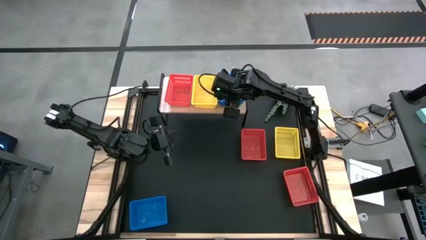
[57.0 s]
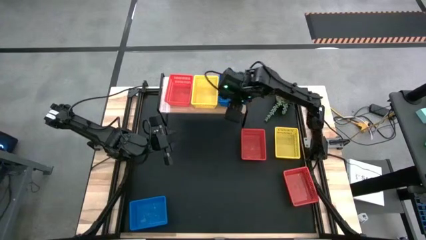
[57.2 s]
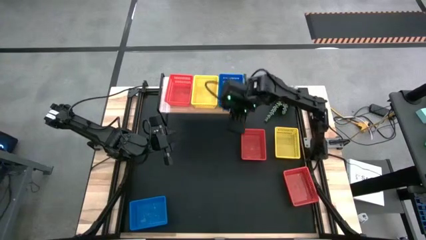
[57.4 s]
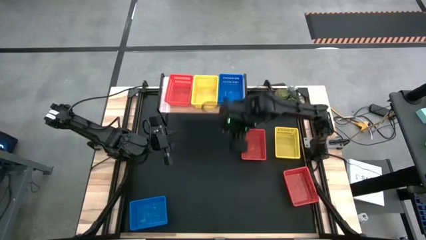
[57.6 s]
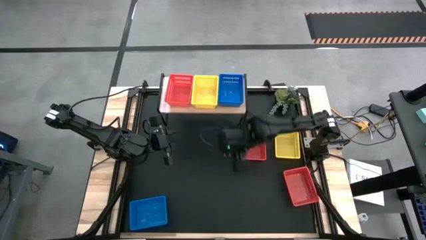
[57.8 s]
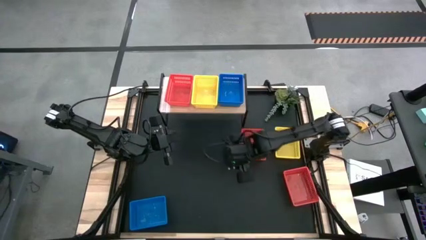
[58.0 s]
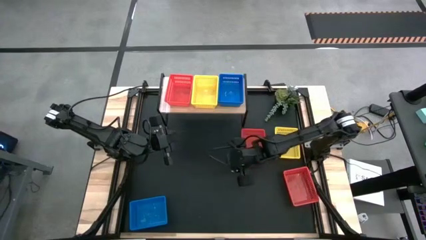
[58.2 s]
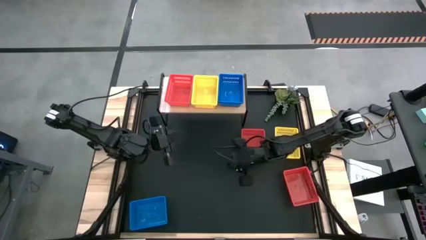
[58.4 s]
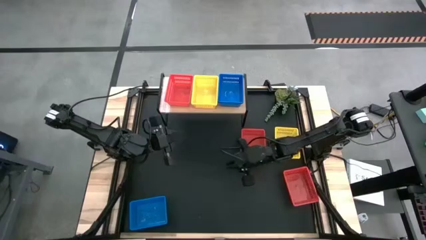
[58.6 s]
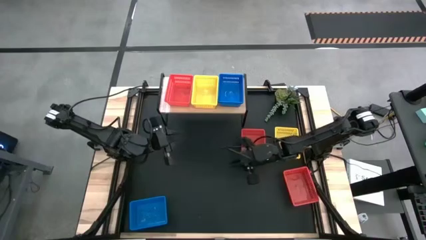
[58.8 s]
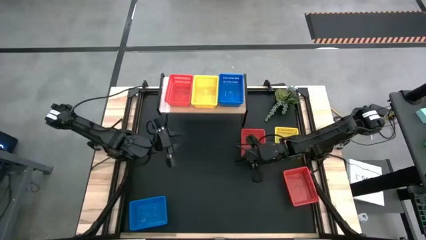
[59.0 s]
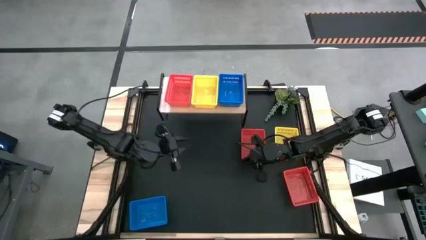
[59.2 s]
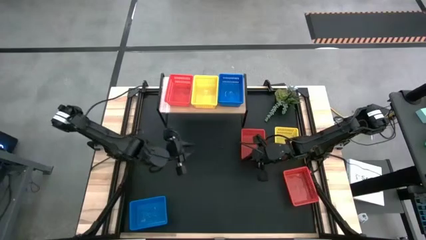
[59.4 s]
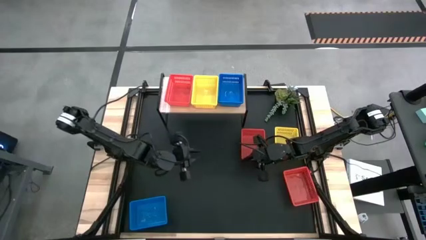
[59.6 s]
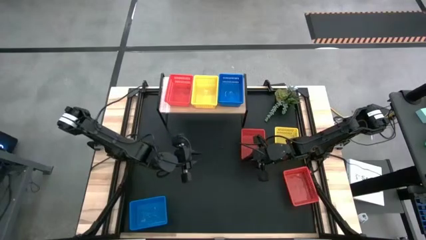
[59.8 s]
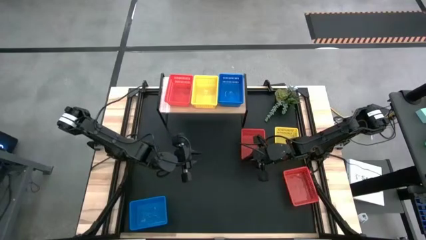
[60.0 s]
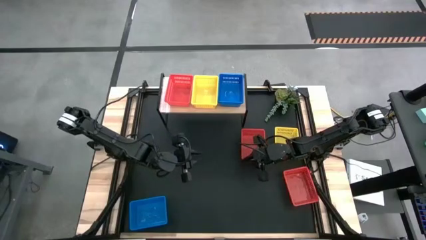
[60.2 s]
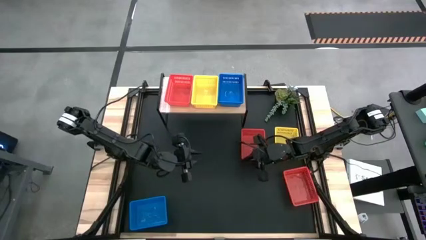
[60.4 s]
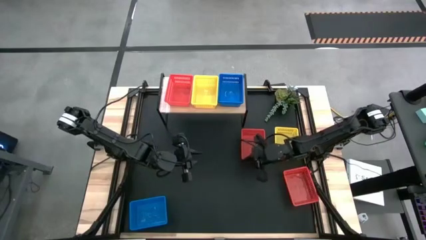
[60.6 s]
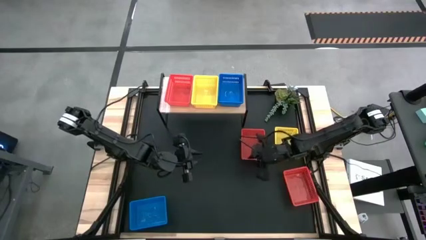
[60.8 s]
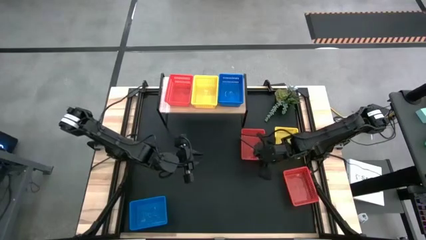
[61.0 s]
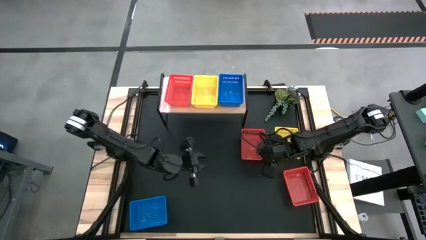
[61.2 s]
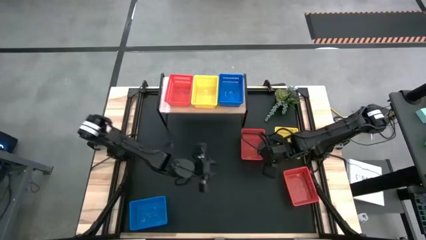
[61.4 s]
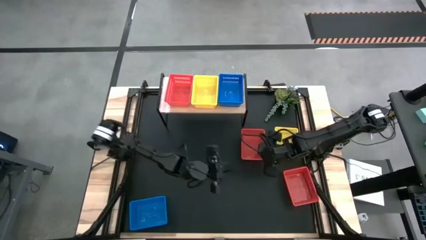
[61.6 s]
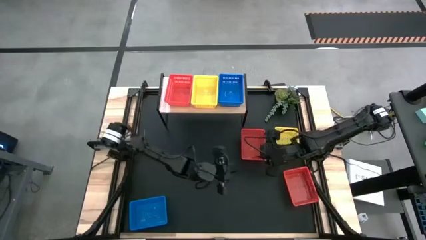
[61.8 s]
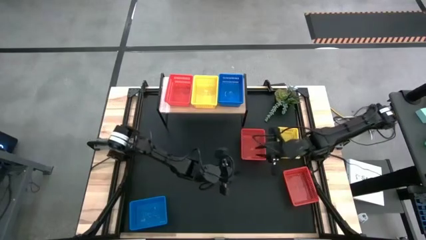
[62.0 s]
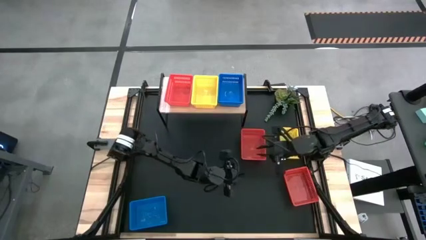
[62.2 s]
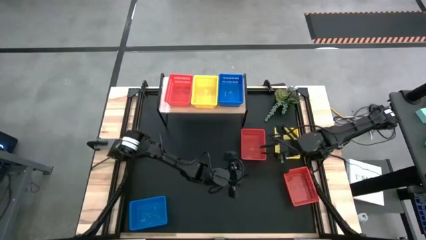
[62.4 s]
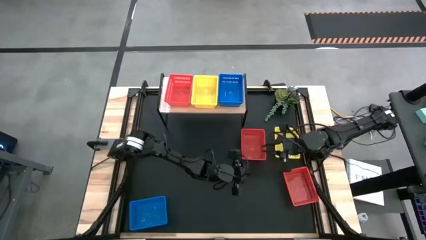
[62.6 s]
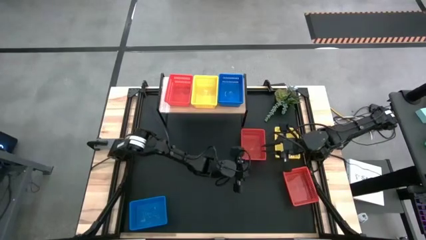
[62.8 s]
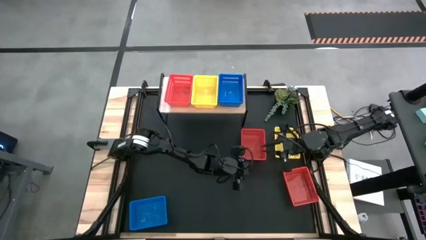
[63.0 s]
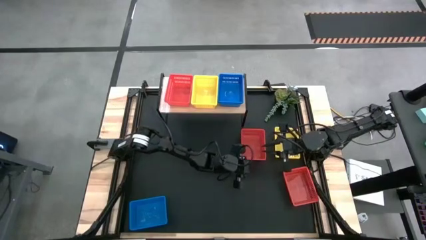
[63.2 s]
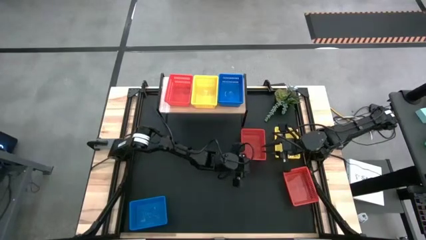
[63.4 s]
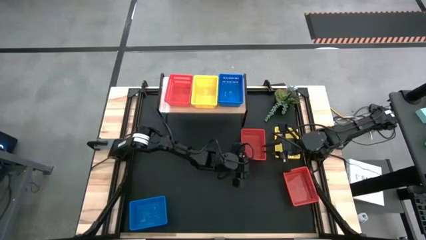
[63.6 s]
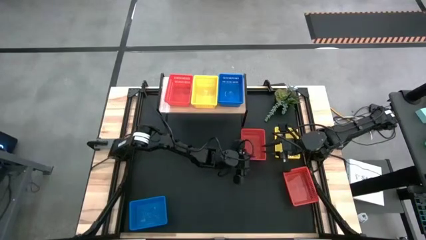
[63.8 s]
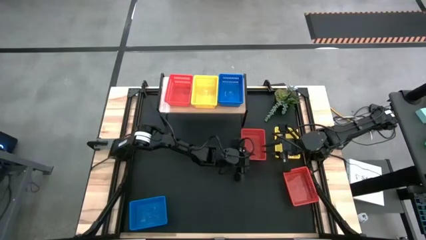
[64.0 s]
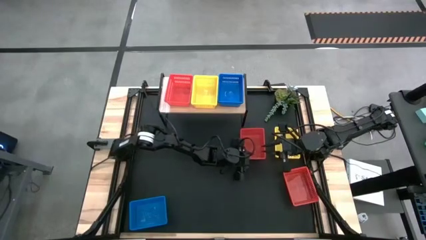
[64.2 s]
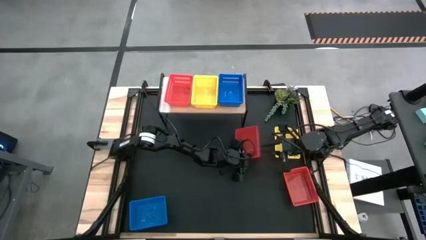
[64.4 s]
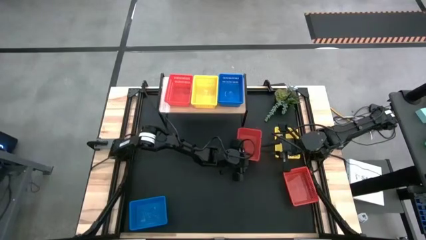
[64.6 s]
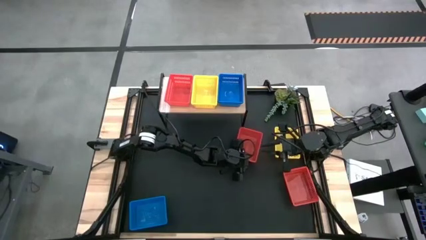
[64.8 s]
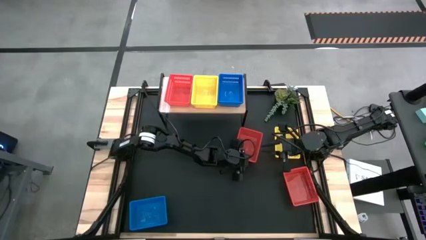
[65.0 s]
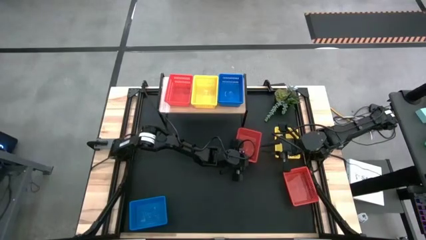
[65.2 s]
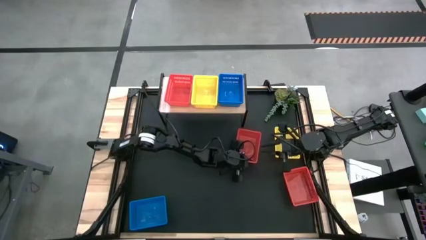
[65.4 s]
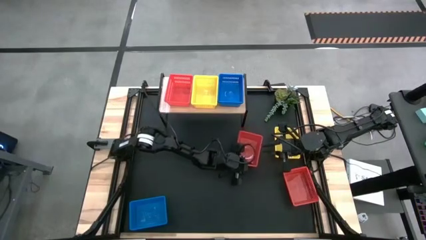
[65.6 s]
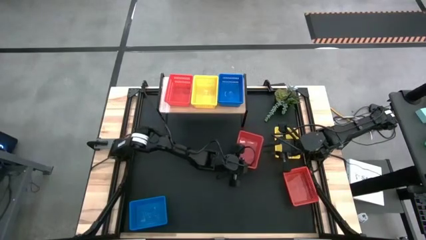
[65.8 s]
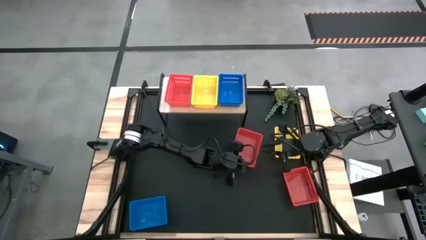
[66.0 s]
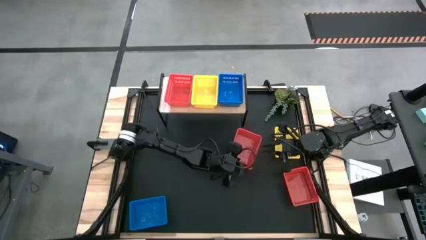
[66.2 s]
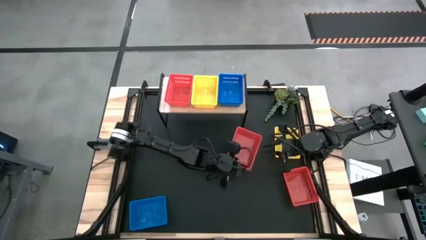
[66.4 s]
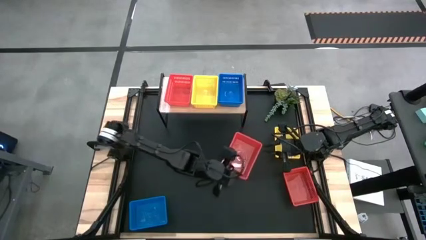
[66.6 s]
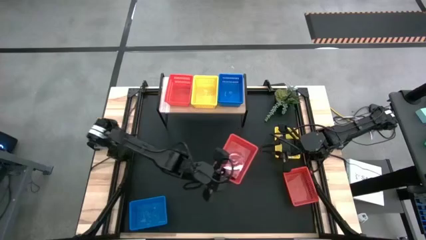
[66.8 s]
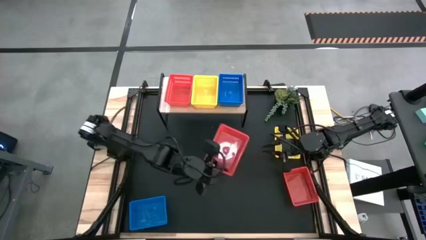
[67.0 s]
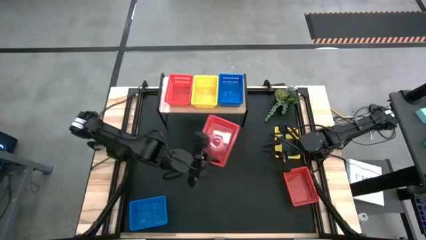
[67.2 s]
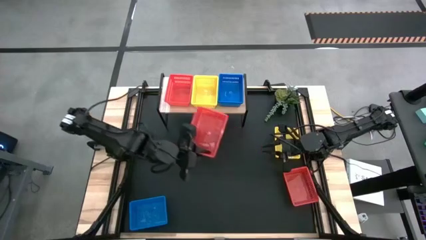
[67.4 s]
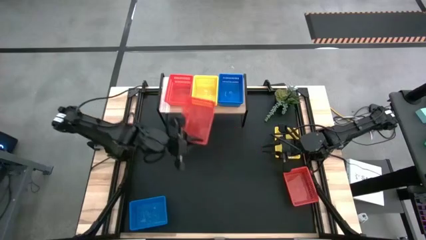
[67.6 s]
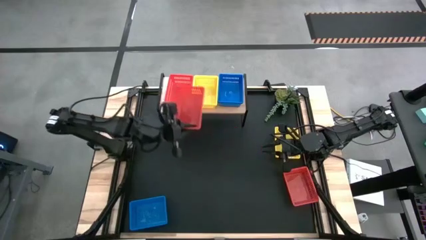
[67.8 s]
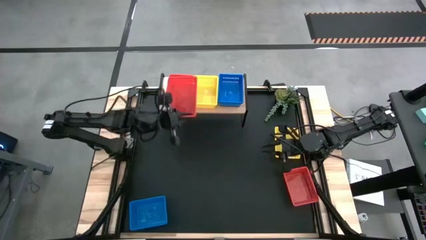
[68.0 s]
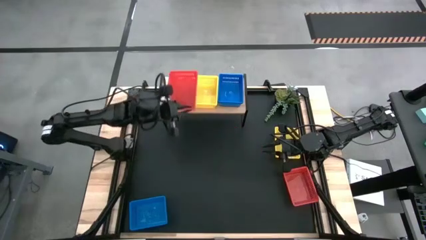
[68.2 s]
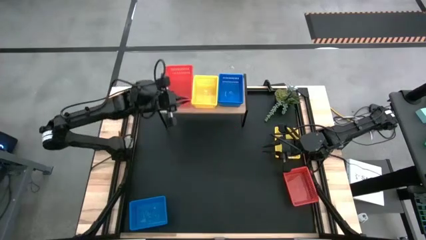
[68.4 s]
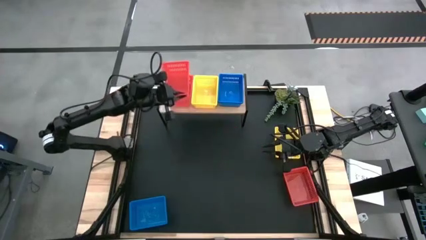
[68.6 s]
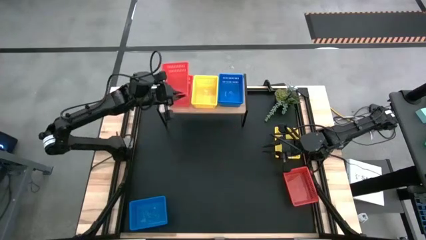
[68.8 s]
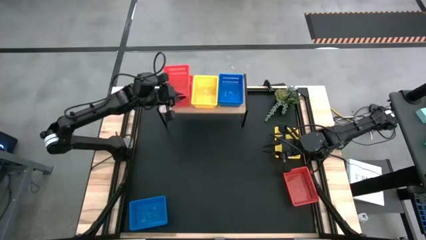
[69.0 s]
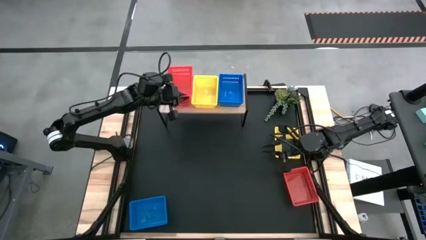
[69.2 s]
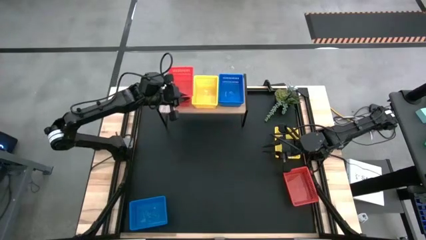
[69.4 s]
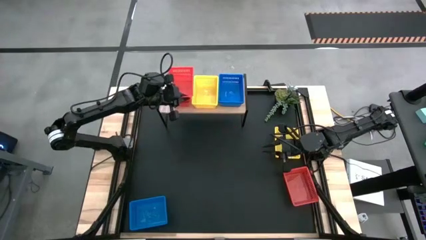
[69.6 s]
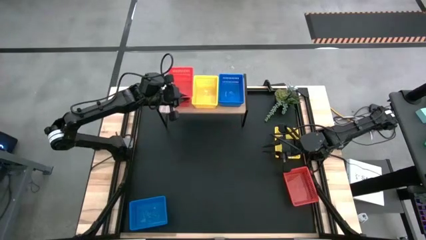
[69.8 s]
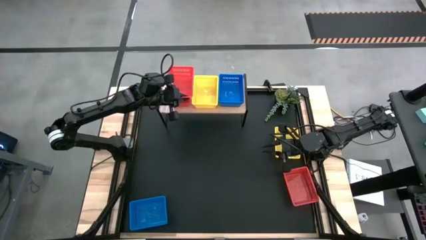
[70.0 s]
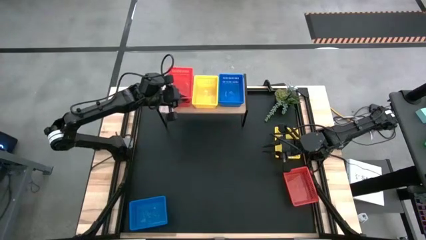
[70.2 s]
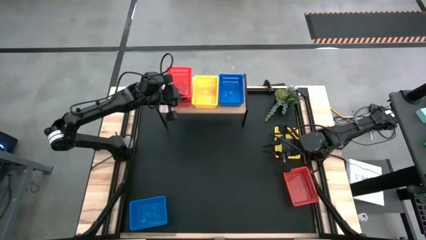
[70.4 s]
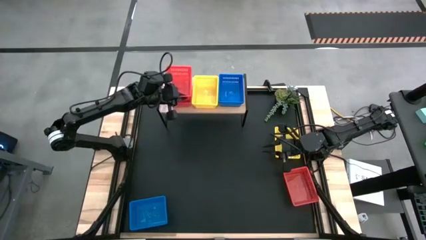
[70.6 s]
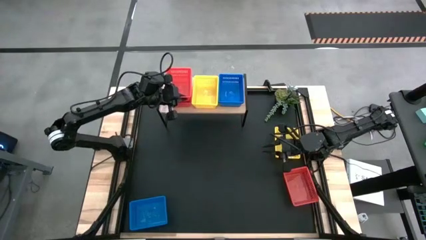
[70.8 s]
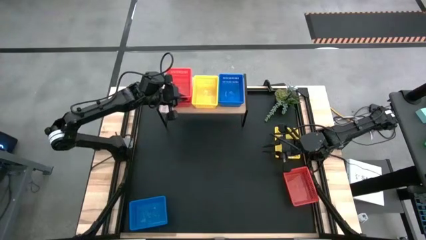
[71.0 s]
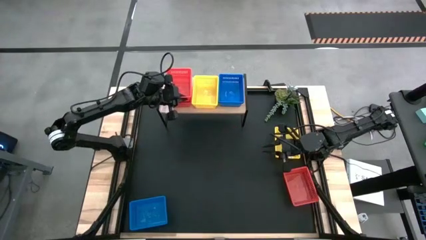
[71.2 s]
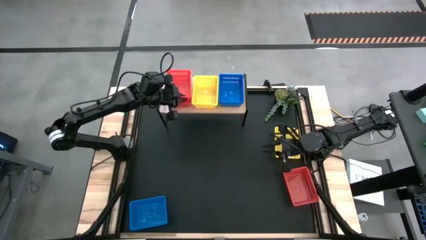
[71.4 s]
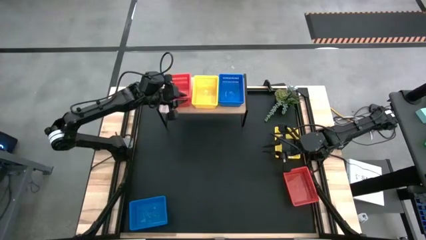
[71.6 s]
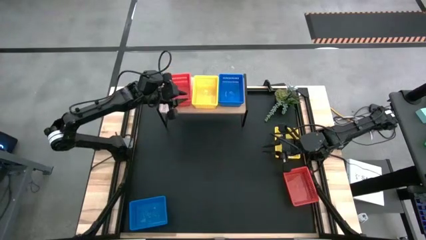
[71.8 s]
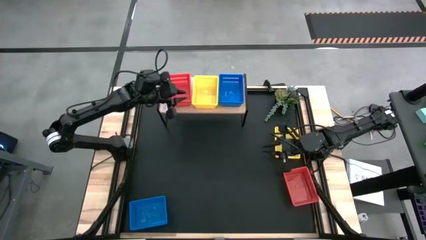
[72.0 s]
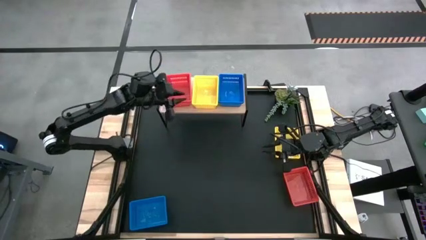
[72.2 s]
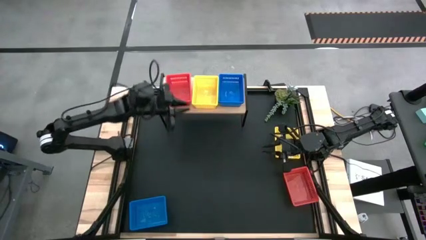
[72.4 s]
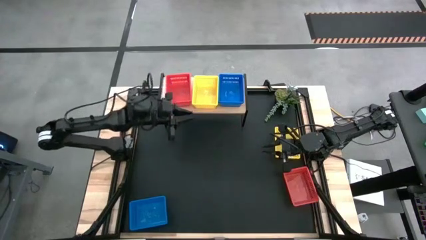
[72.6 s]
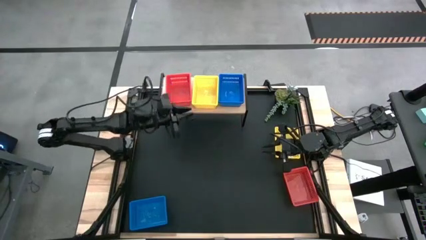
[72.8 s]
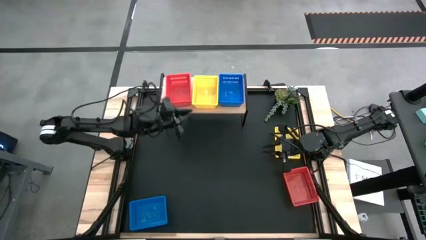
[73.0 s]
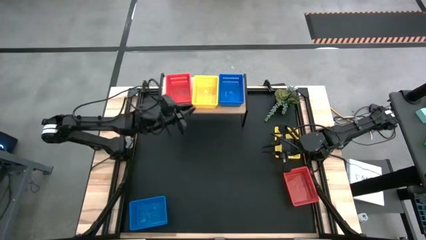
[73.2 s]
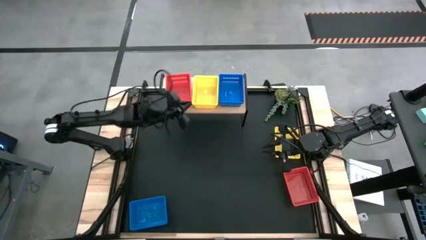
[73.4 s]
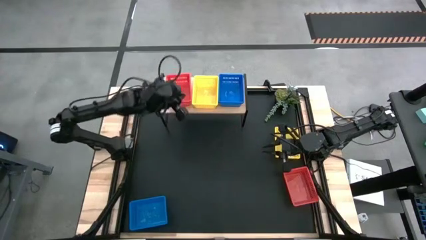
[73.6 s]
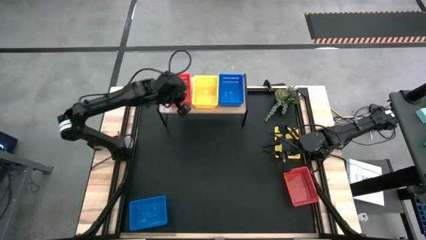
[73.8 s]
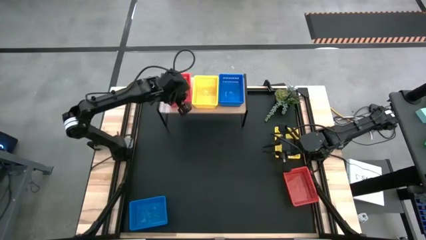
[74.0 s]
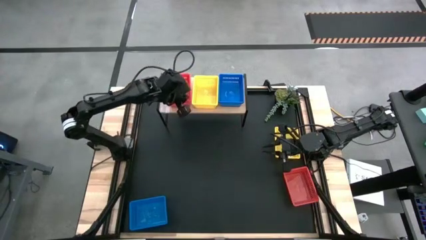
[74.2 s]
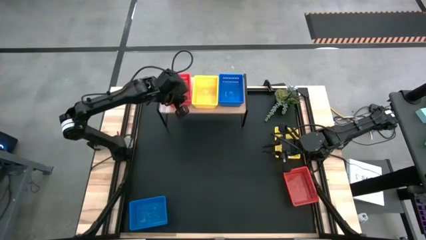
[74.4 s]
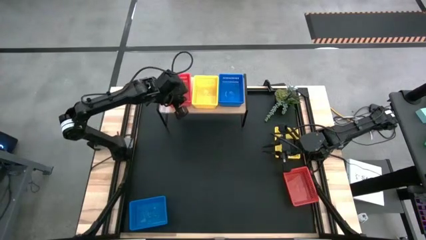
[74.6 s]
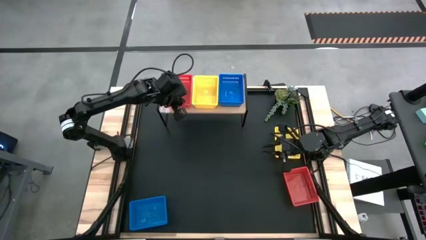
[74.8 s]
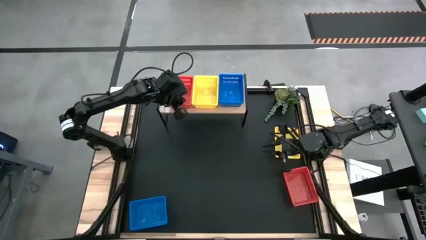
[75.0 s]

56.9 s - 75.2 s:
Task: Stack baskets on shelf by color
Stack the left red bin on top of the red bin on the shelf
